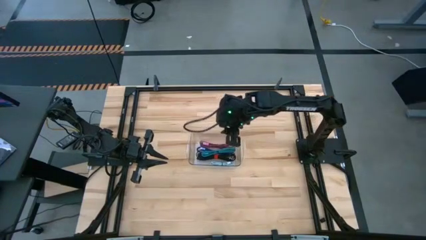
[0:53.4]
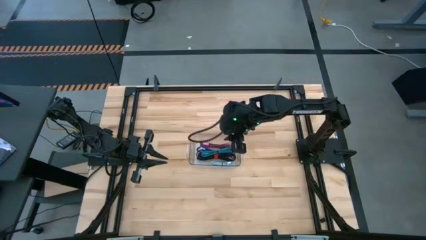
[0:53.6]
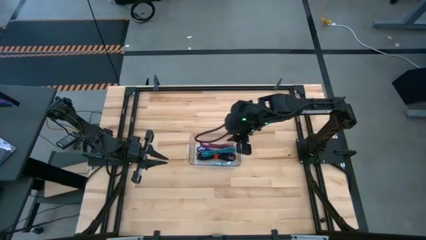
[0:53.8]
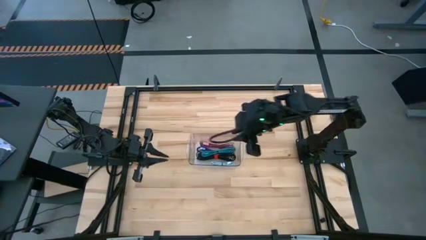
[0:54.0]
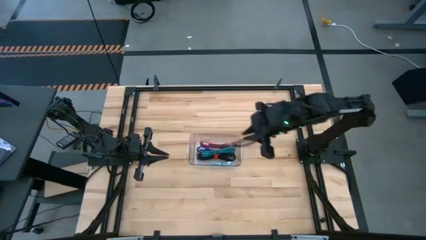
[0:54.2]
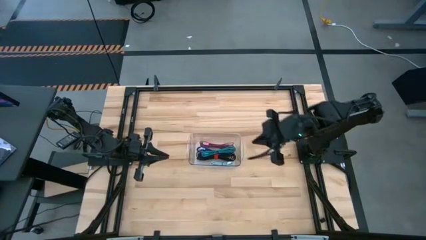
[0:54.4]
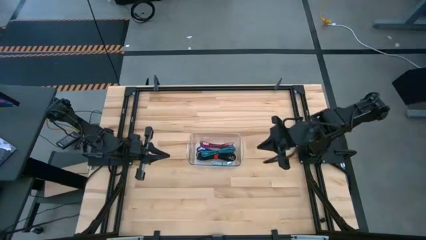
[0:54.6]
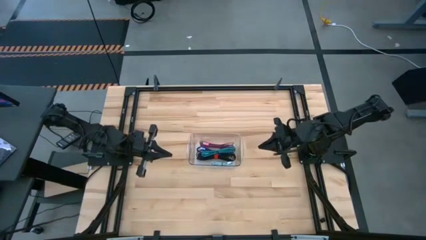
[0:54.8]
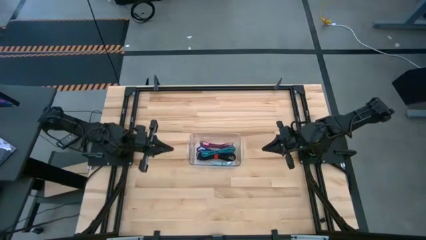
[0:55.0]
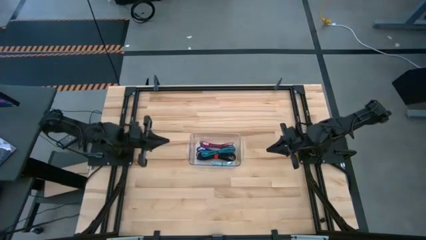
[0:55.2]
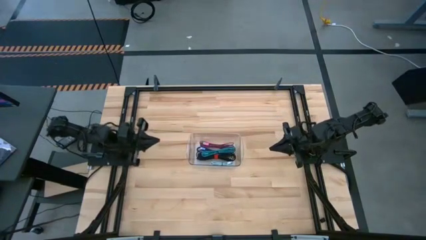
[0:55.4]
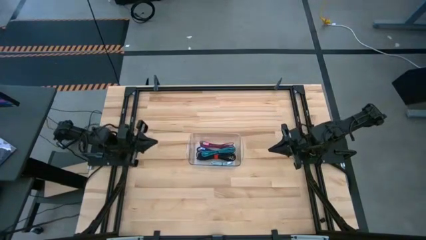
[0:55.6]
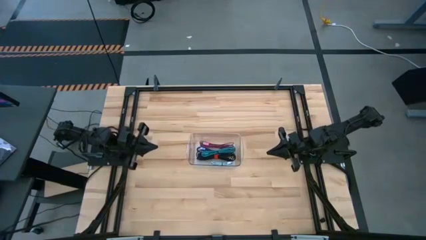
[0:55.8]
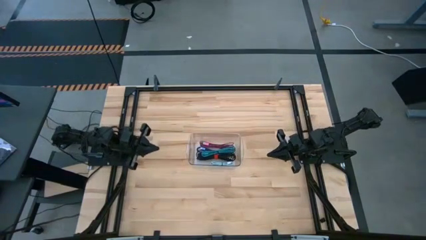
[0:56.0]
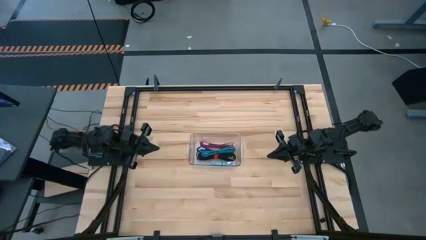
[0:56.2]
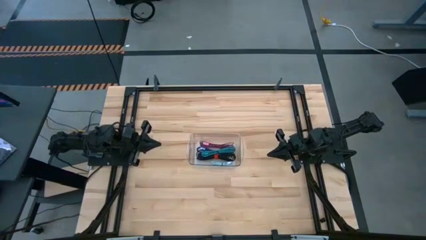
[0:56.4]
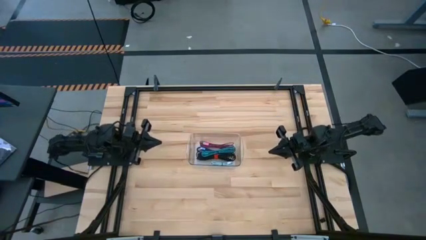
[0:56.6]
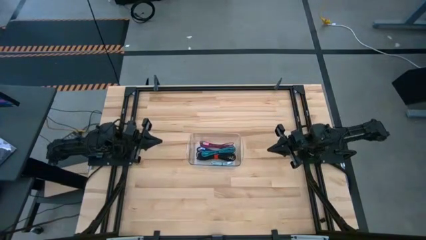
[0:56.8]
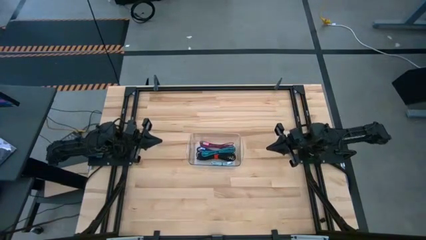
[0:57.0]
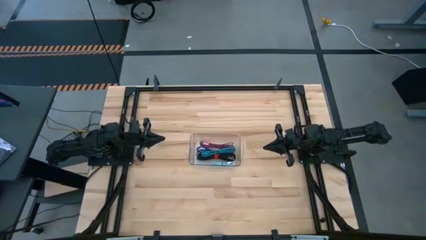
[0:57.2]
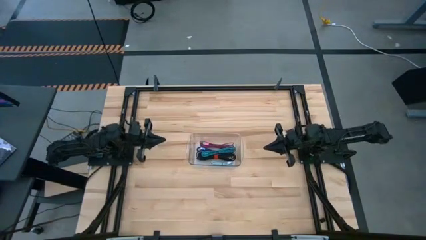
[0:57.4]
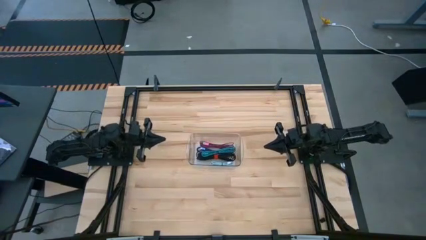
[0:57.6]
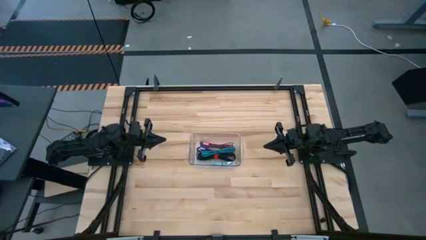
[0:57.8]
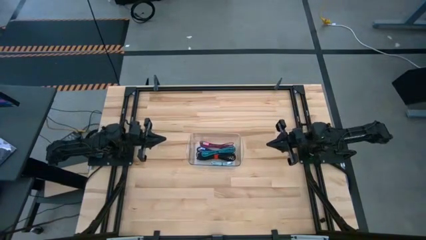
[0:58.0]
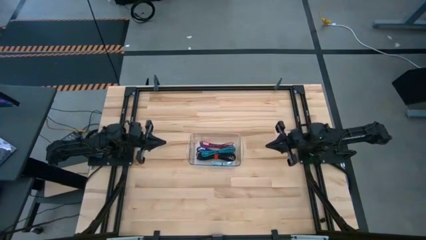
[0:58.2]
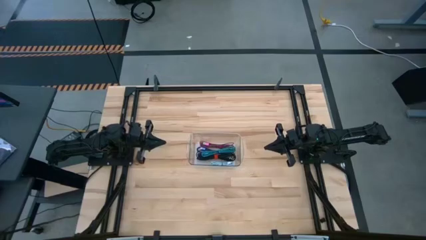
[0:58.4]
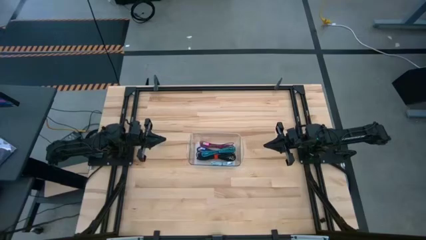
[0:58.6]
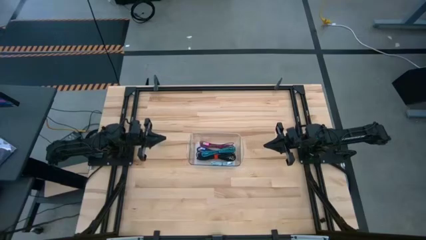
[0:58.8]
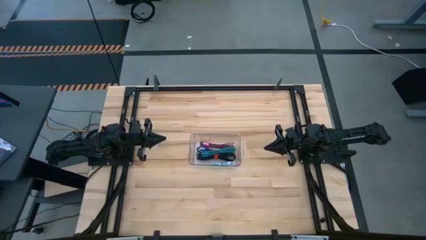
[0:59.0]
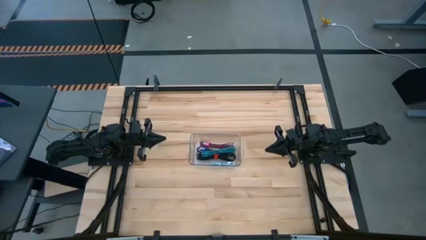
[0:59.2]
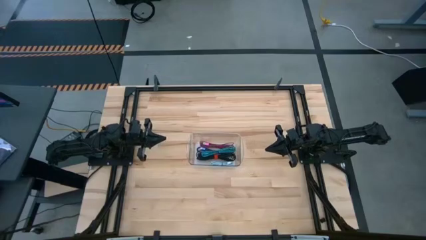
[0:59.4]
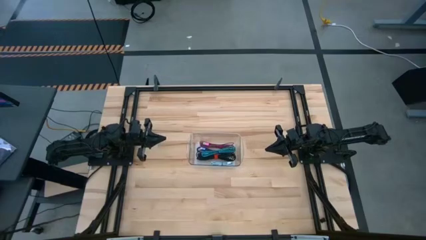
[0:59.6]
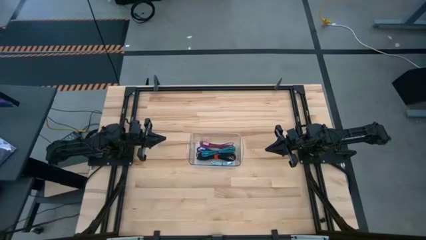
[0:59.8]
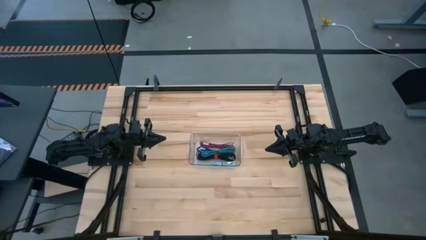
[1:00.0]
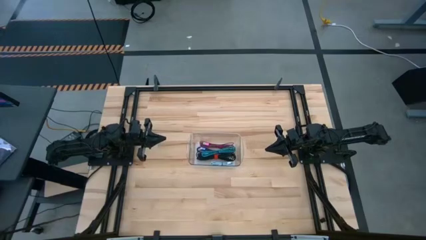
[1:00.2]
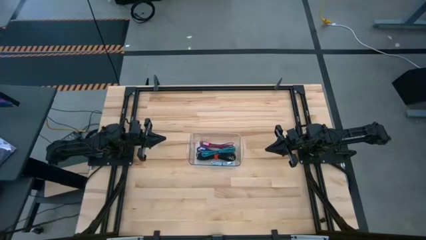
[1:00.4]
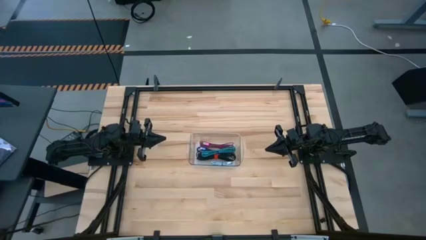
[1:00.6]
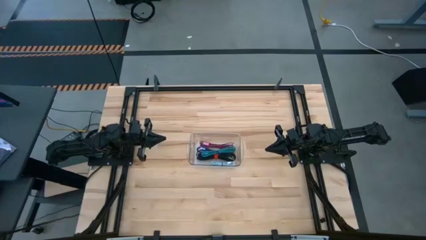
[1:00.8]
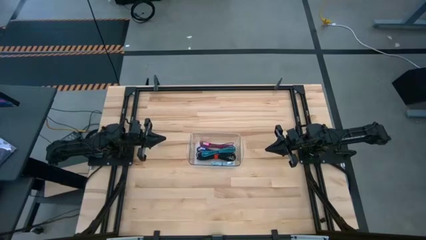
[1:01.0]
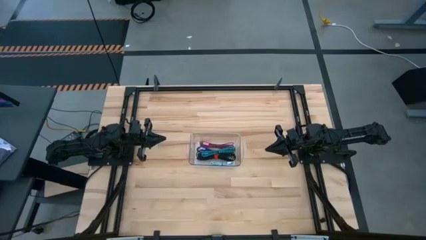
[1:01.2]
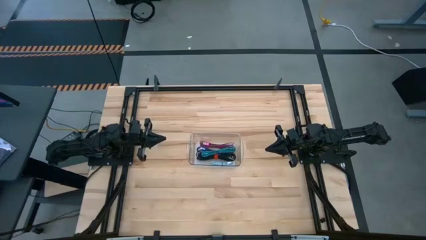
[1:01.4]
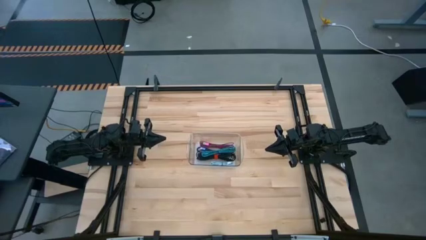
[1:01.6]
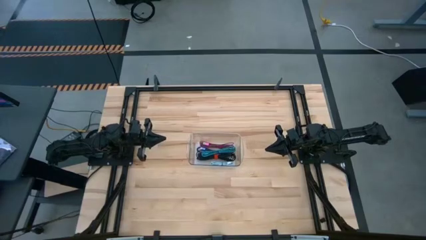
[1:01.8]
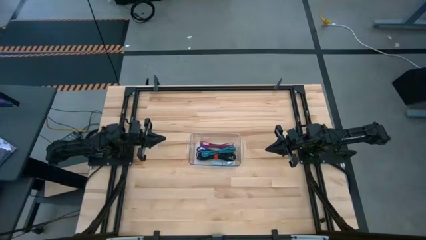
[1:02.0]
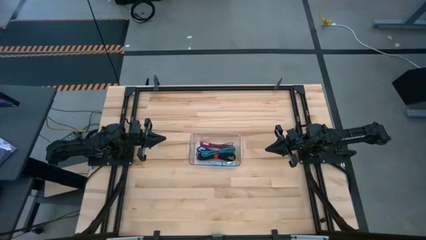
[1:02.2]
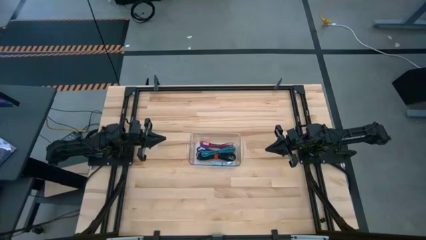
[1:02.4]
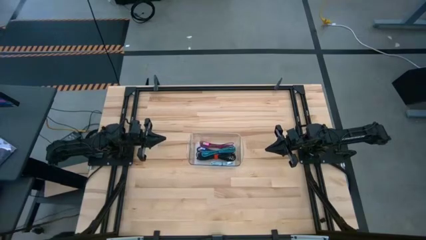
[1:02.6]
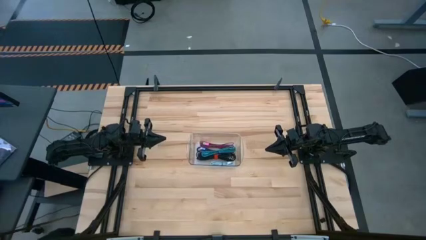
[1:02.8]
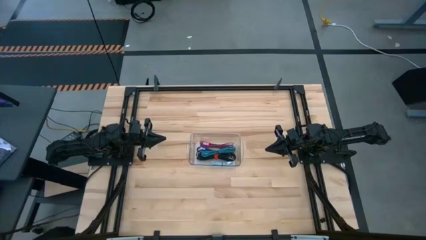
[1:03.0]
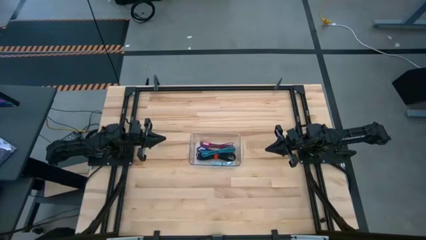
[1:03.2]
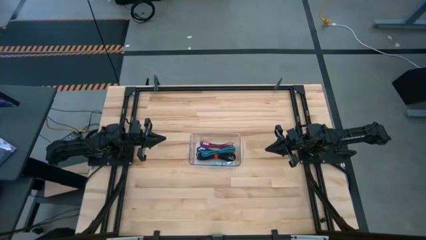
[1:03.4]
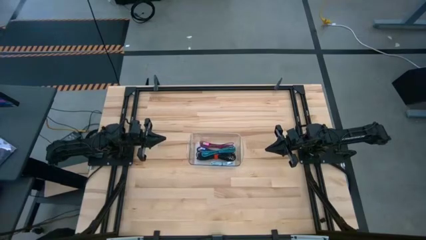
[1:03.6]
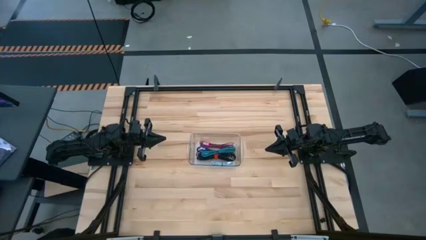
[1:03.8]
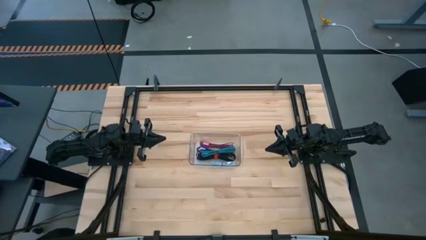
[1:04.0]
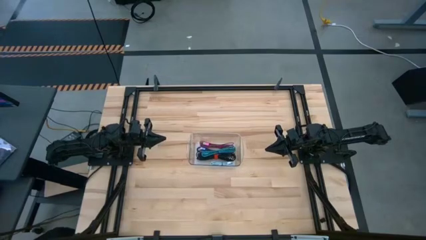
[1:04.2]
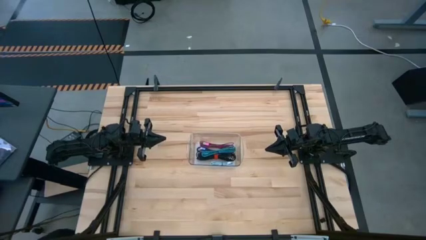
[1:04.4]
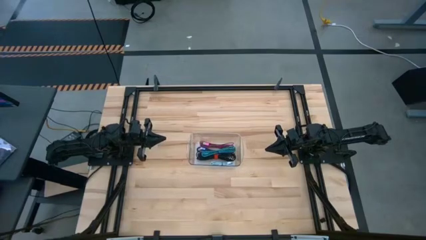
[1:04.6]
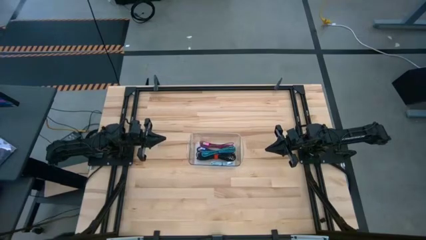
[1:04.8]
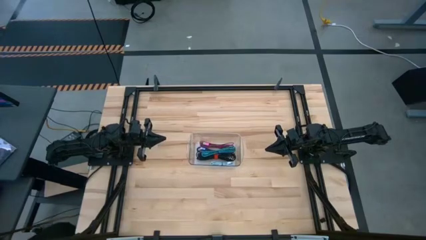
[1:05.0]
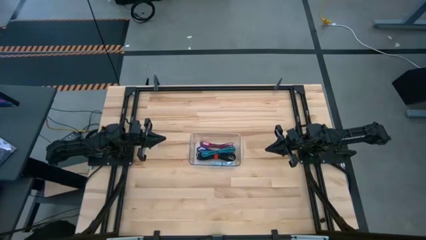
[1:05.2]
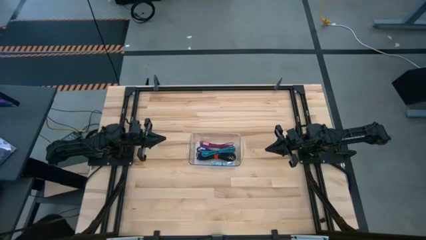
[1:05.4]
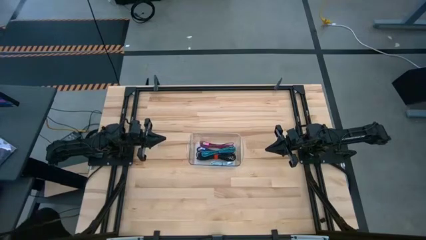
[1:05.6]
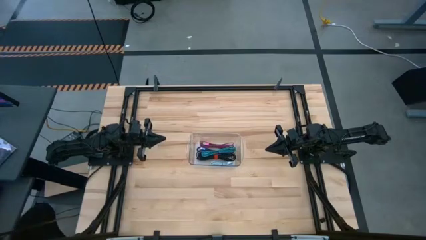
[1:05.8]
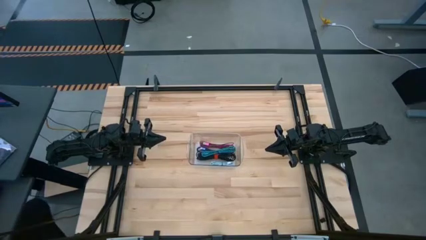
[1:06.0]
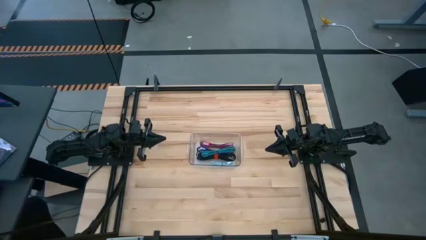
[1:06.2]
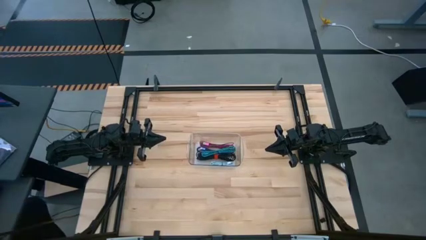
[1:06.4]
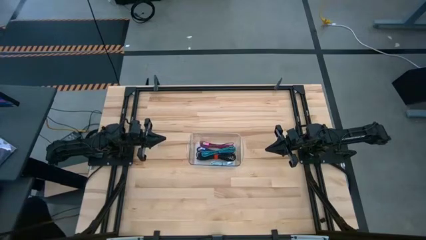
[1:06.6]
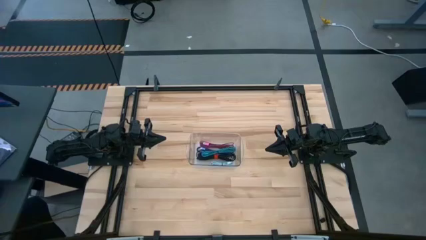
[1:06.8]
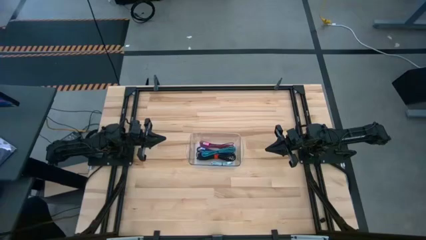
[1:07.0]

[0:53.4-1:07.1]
Task: Pick and place USB-C Cables
Return to Home Position

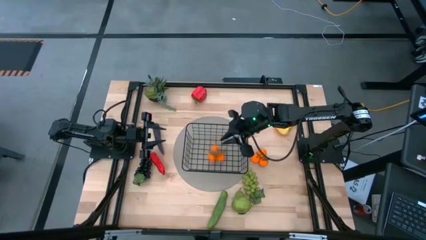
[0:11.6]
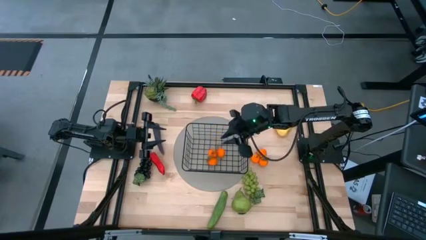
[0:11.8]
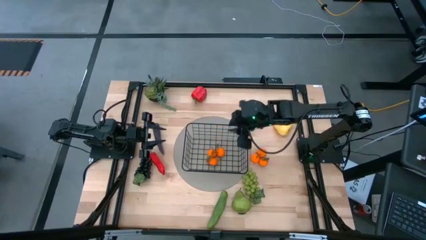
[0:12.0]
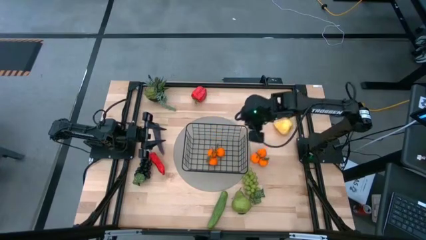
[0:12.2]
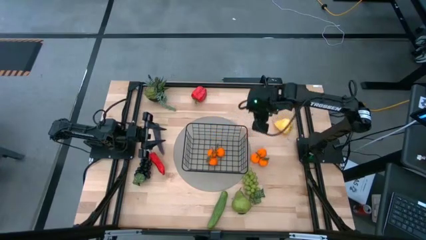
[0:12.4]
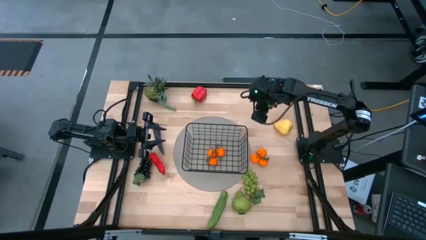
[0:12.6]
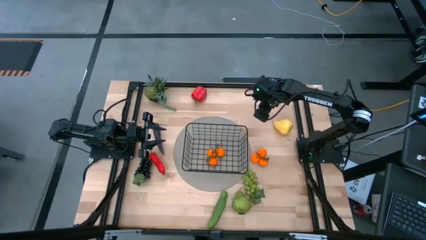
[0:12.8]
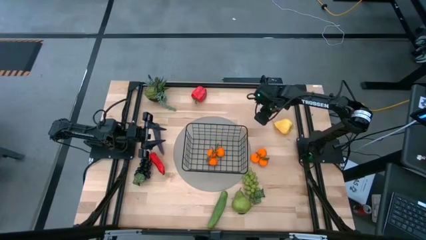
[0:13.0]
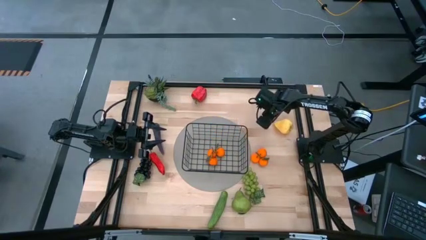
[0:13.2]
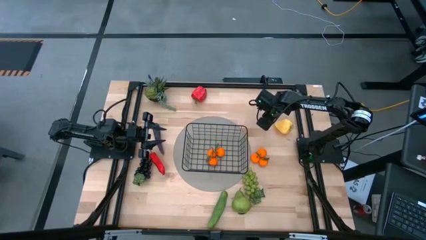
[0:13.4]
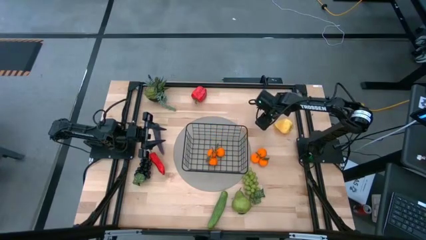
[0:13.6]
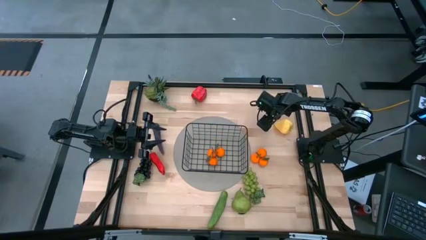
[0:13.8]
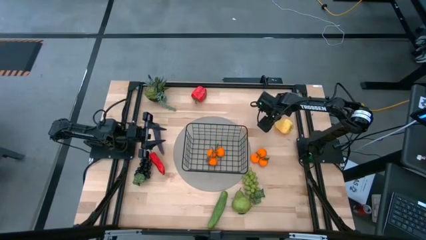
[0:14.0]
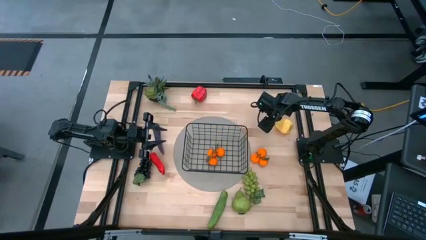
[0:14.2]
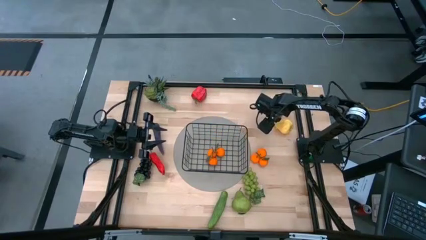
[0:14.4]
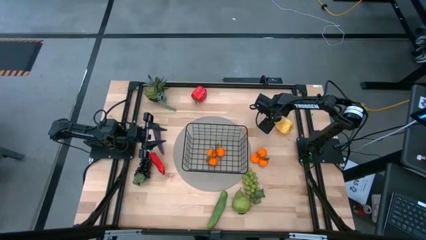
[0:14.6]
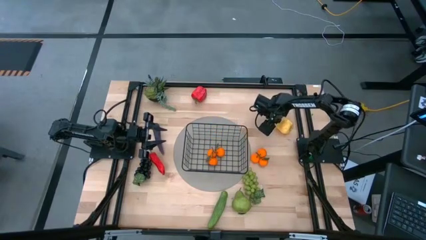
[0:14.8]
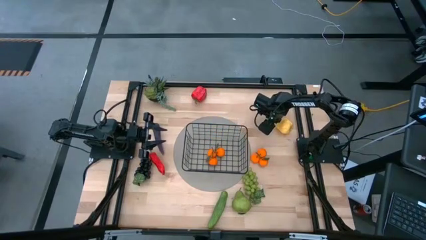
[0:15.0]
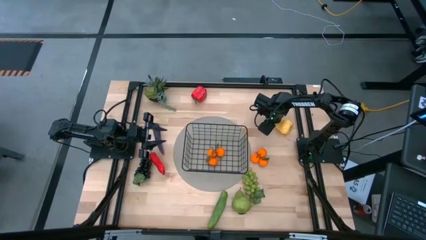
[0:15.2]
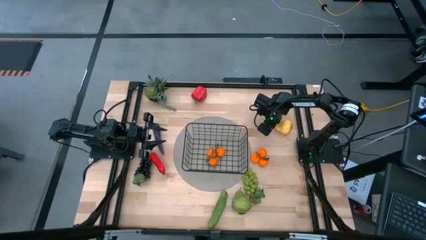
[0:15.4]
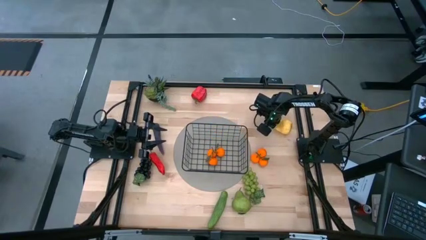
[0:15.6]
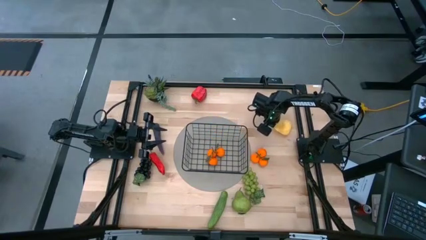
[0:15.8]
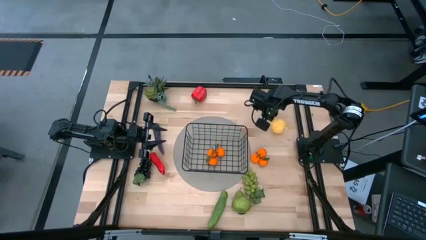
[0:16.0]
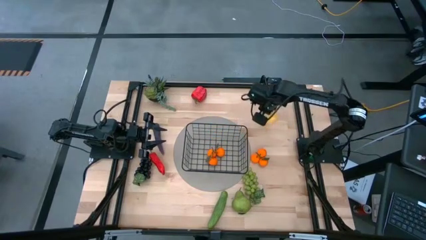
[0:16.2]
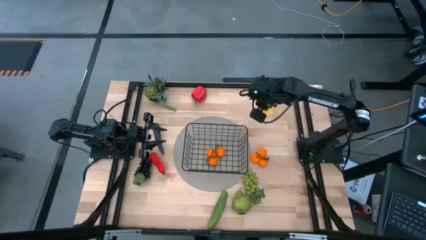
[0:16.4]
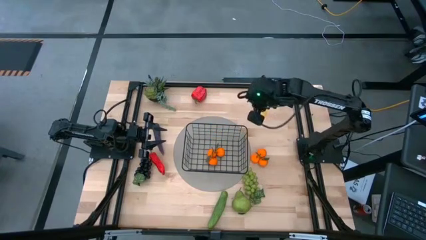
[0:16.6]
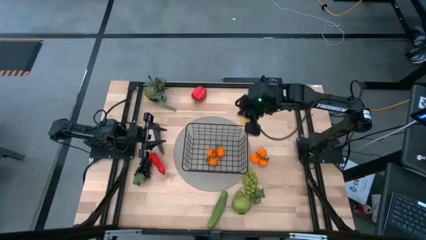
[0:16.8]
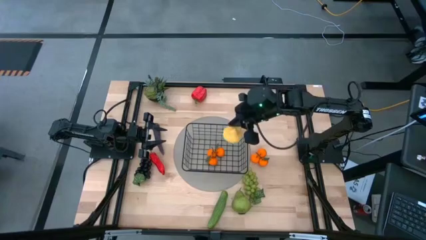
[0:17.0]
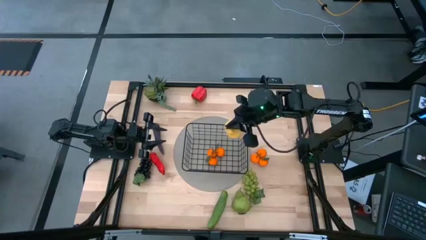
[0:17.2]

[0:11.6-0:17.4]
Task: Build produce basket
Put the yellow pear into the black wire basket
